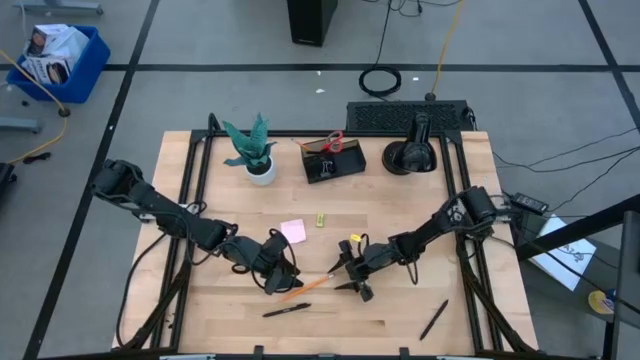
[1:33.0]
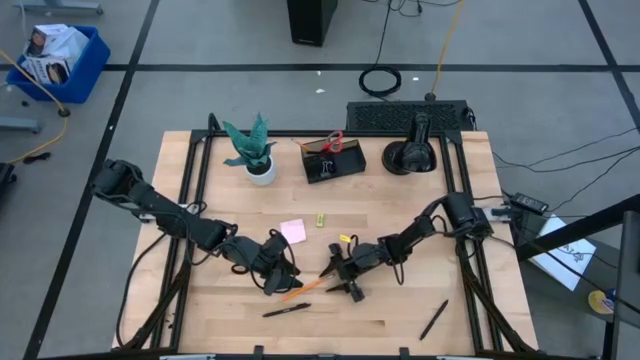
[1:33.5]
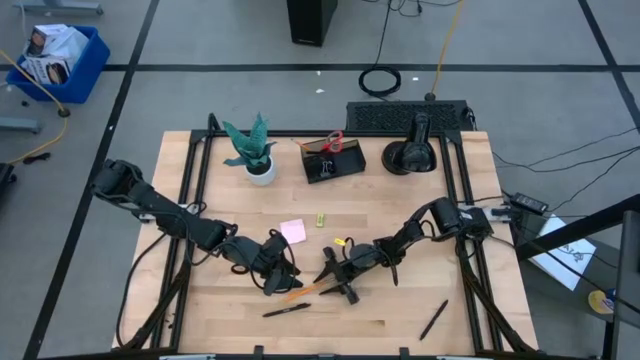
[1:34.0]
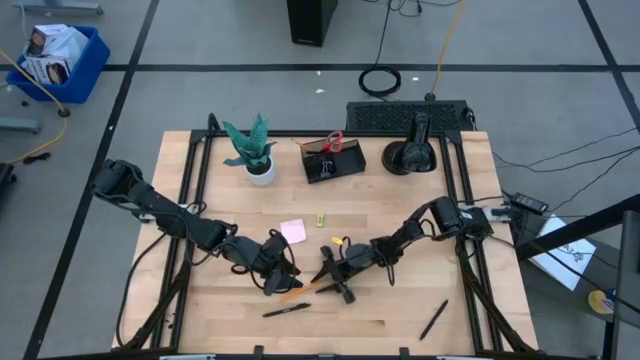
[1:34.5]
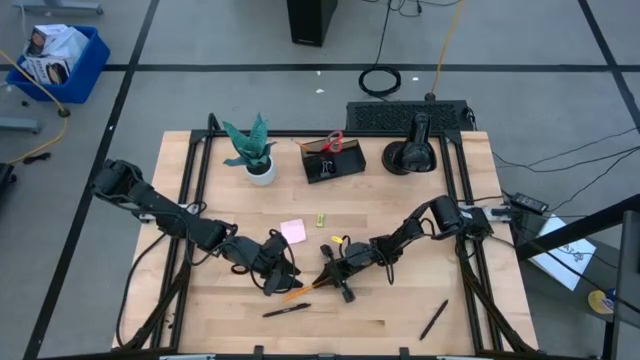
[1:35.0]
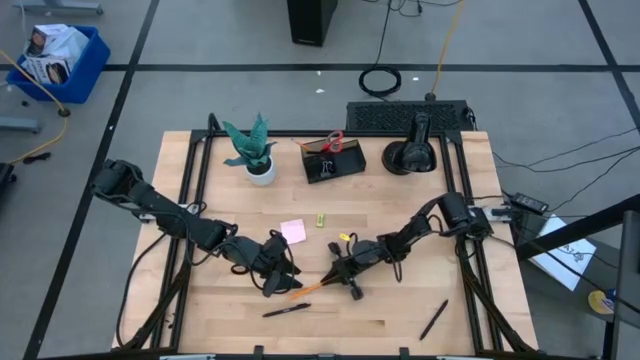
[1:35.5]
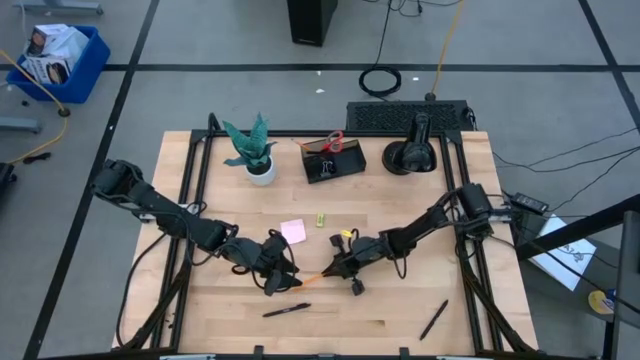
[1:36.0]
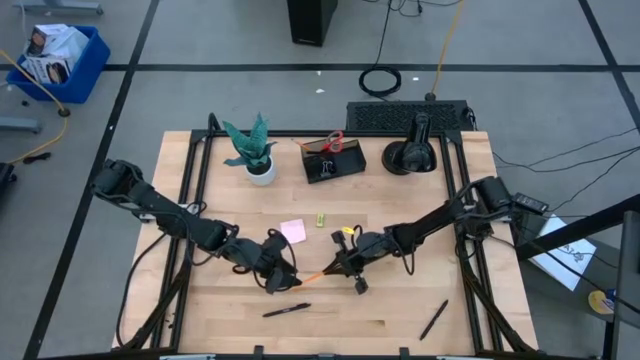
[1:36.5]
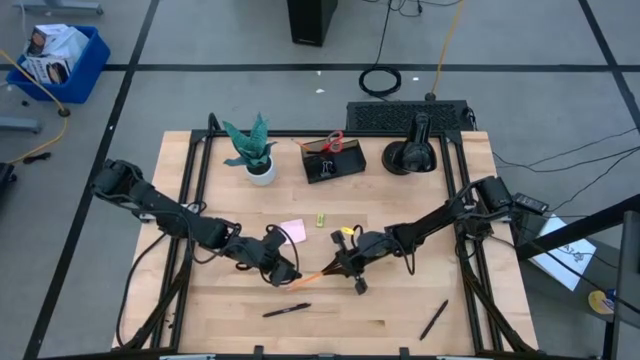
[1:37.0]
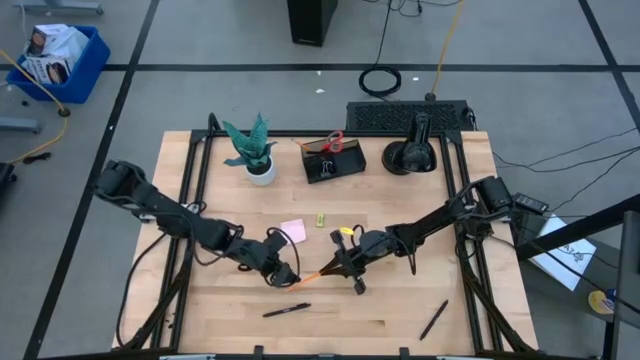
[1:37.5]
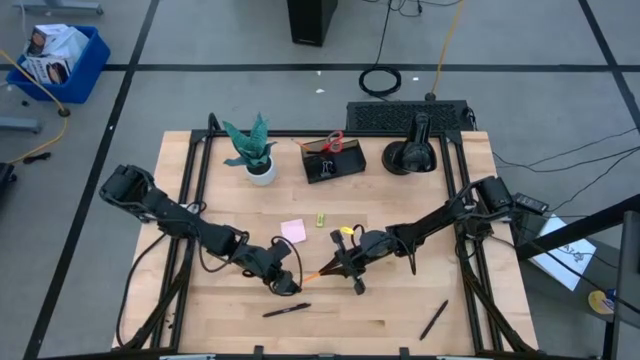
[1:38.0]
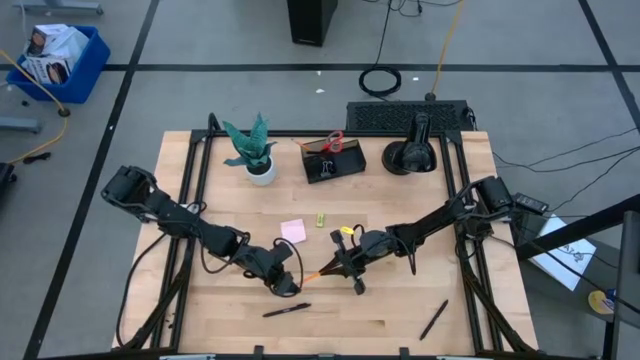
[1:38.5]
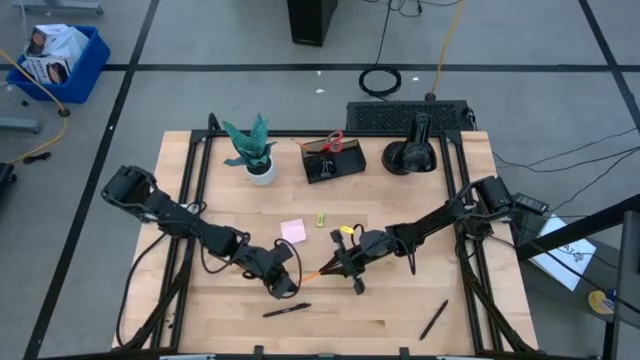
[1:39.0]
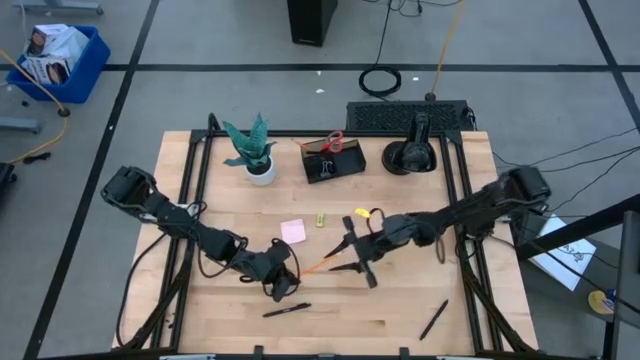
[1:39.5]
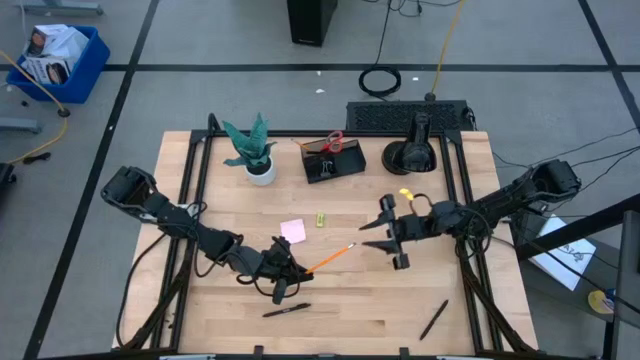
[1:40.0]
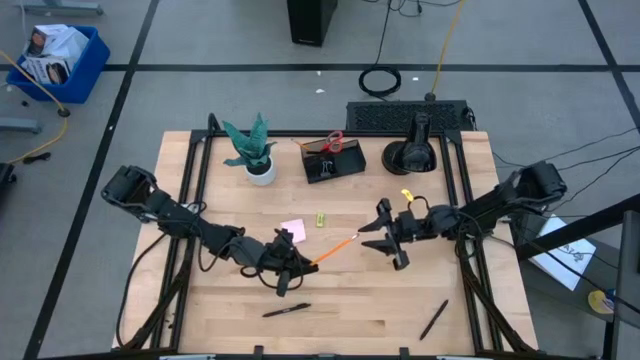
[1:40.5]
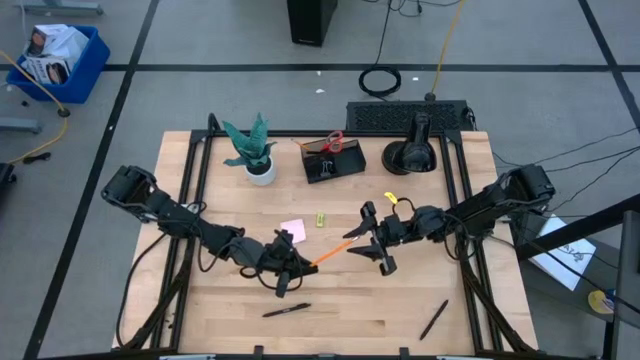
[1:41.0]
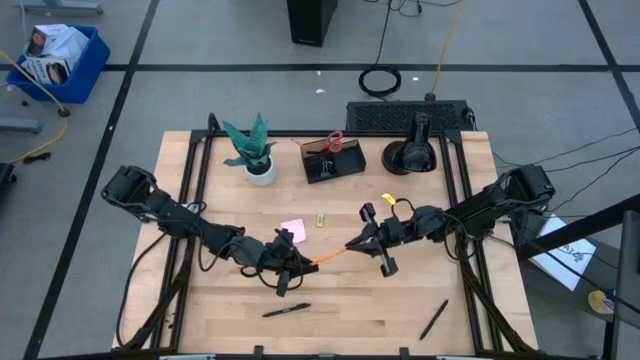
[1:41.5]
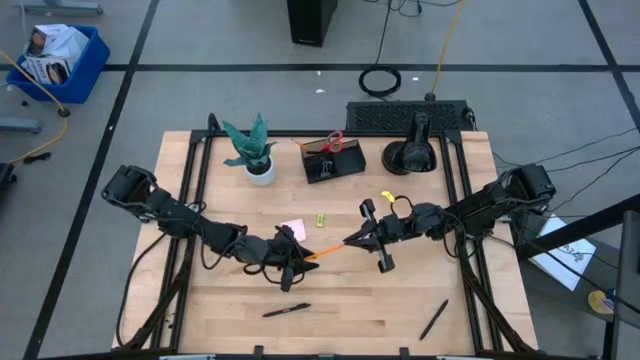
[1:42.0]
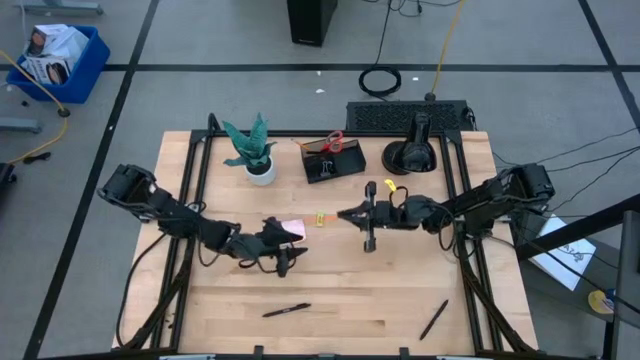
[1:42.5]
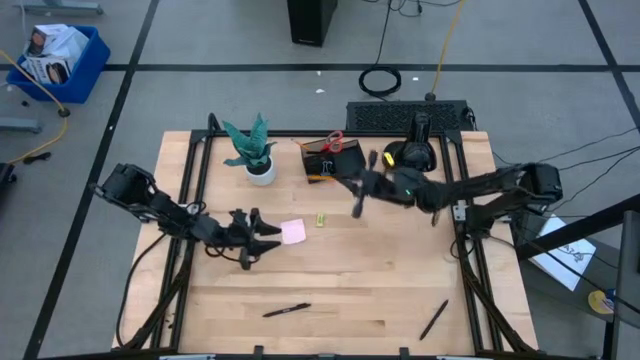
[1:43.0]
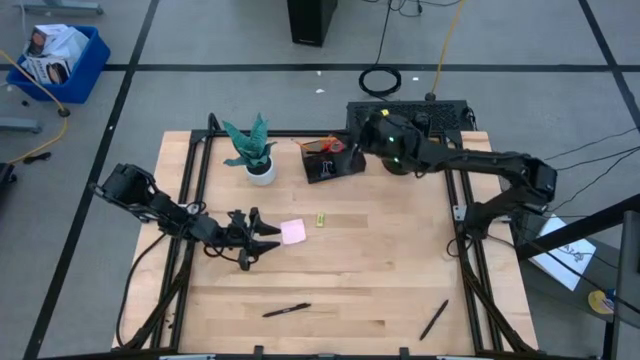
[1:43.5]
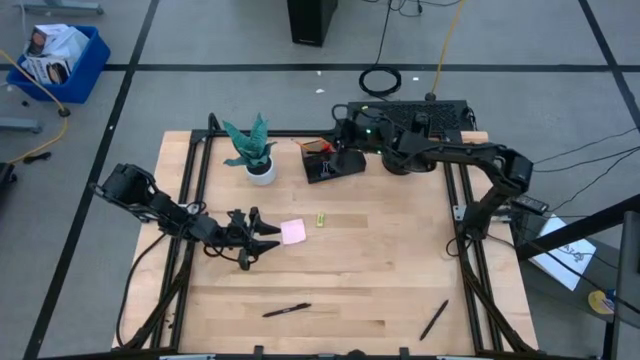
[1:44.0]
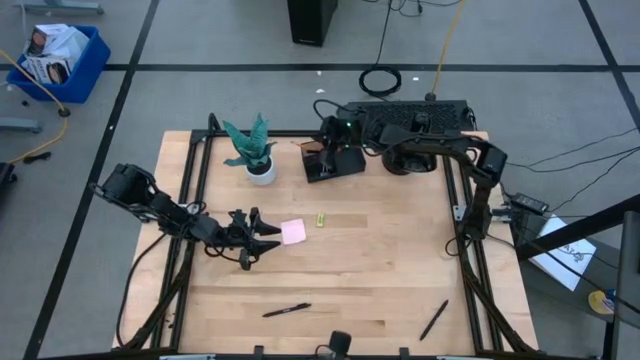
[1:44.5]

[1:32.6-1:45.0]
Task: Pick and place office supplies into organizer
Put the yellow pencil into the black mesh desk organizer

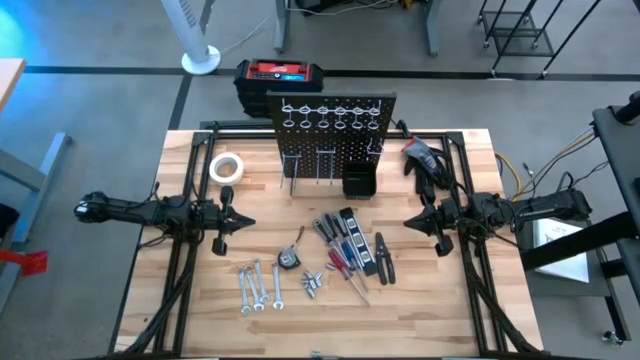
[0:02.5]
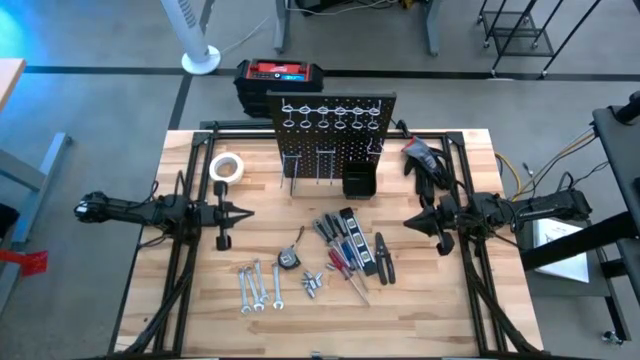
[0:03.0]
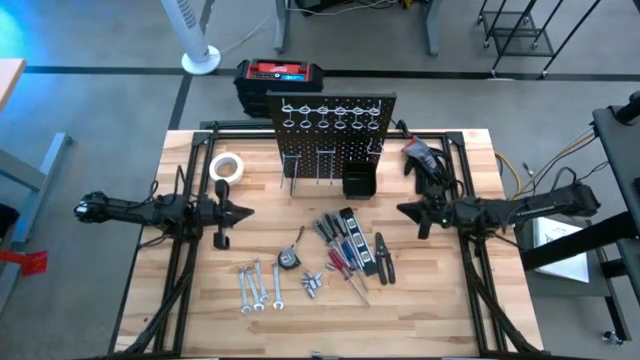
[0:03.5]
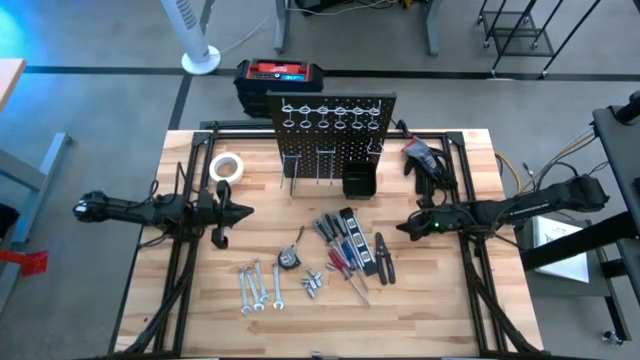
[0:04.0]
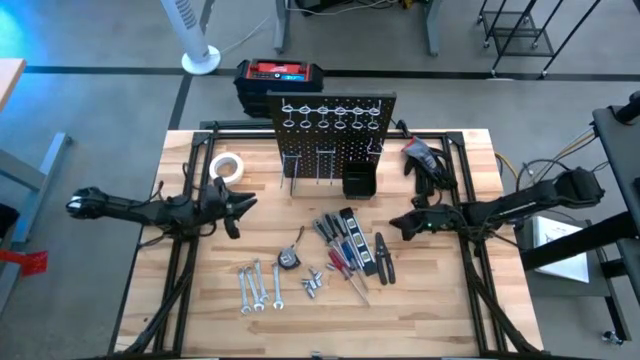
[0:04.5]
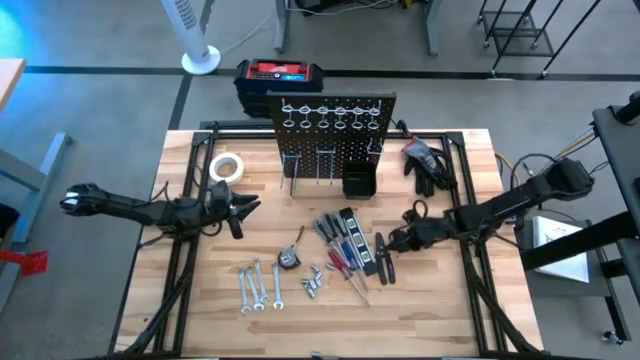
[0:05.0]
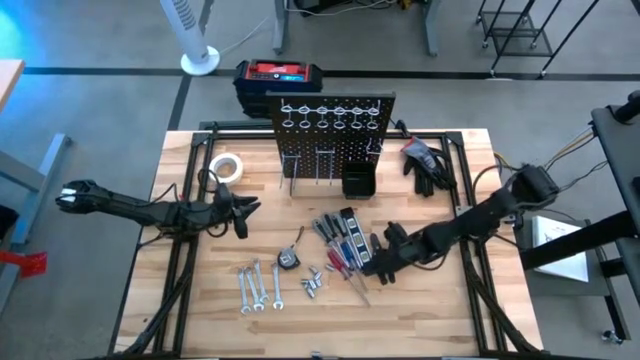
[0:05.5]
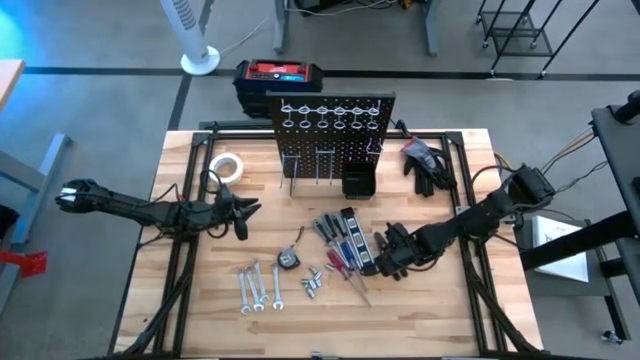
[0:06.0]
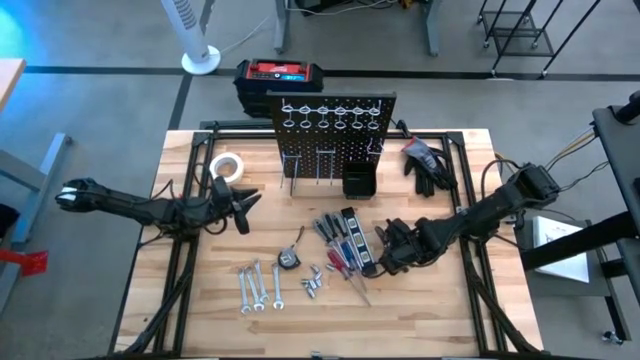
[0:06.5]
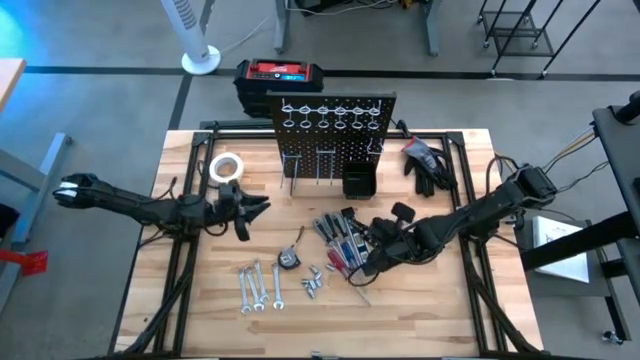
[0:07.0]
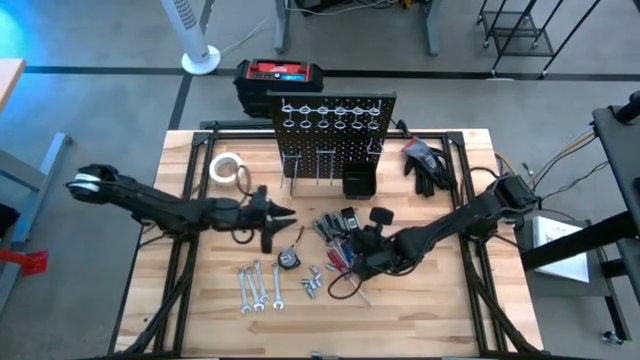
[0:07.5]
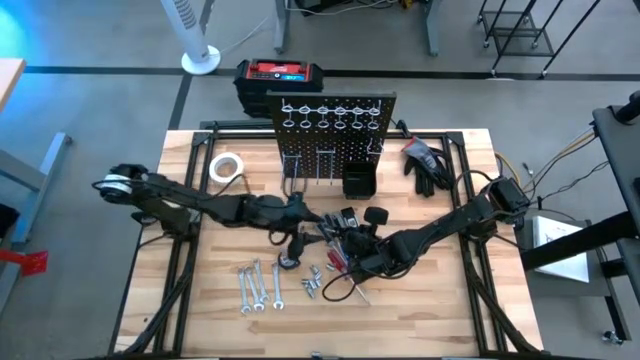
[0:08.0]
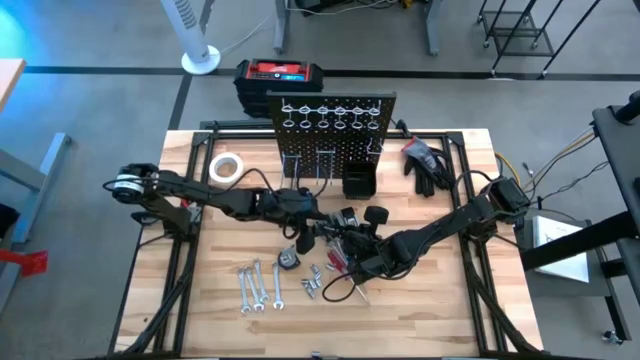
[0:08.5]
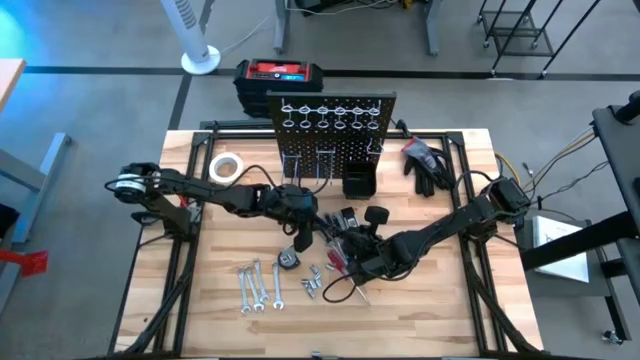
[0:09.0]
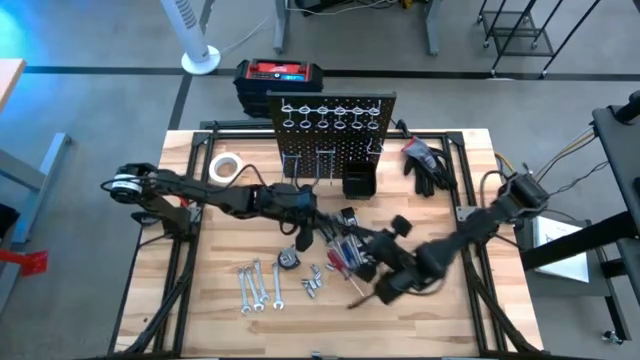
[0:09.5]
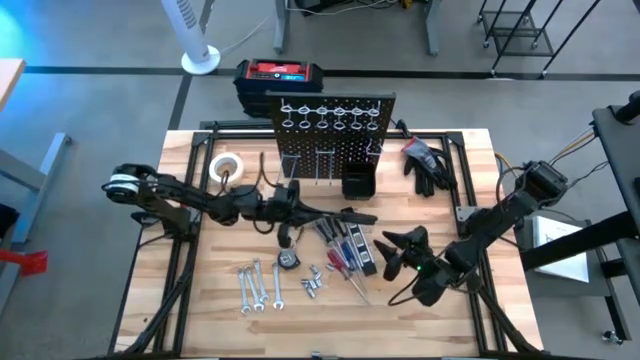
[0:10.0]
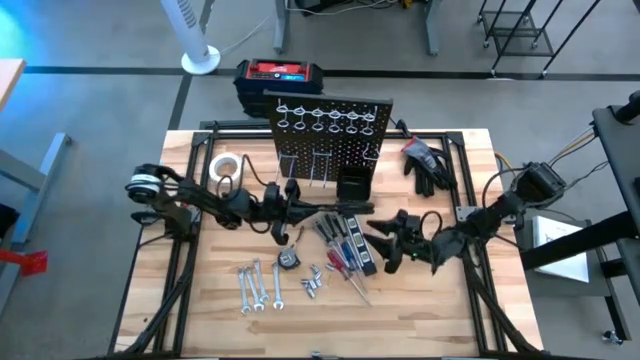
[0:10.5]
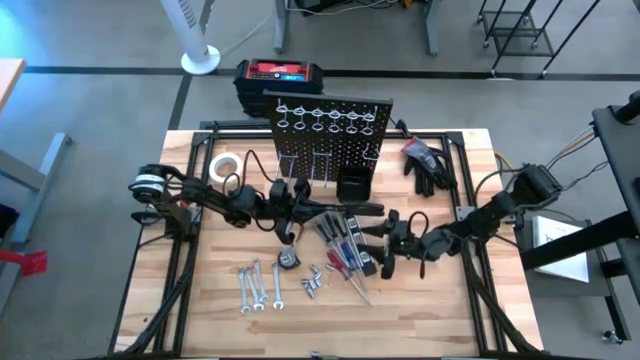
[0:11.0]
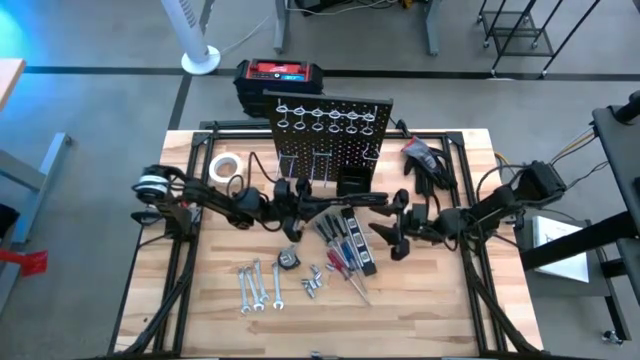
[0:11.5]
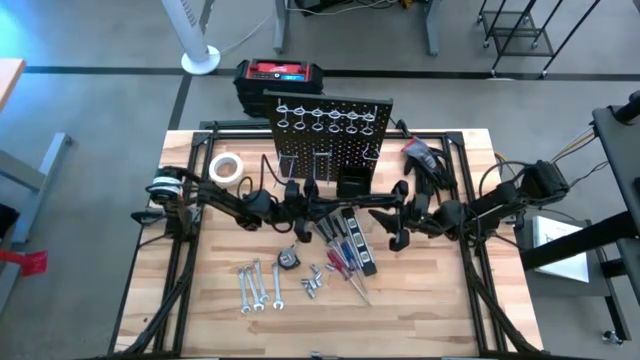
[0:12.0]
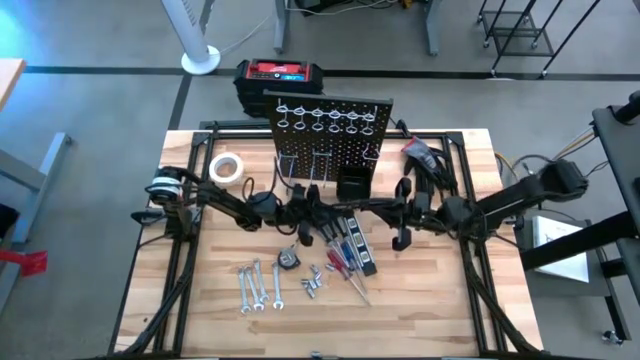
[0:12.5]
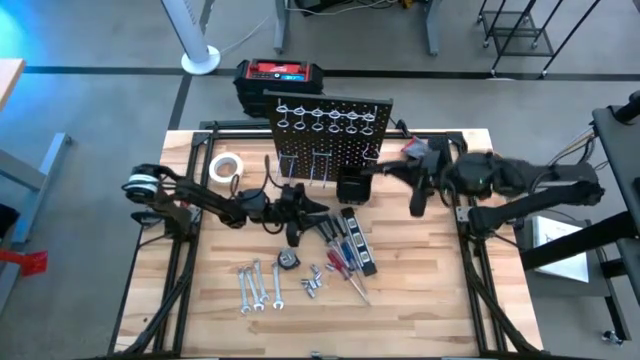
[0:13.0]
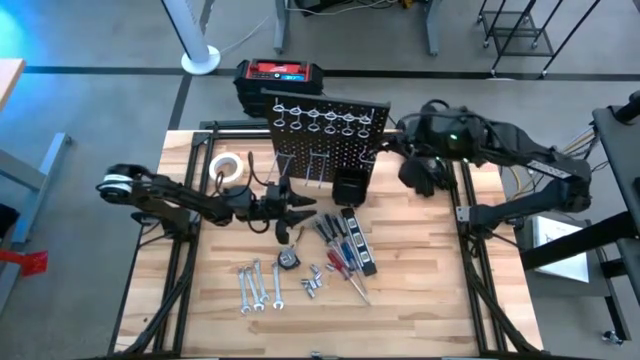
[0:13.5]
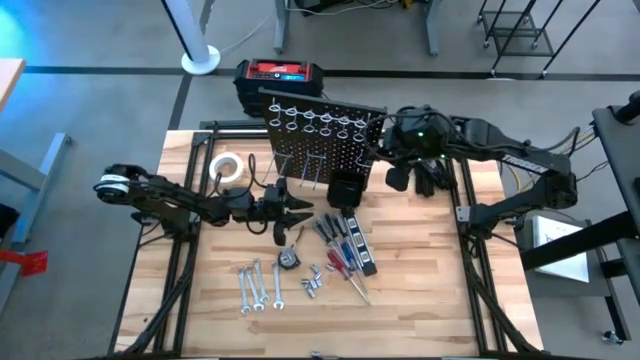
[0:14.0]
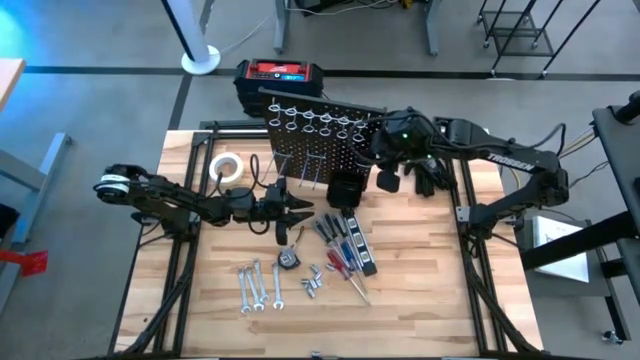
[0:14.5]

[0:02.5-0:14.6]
Task: Hang tools onto peg board
Hang the combination pliers on the peg board
